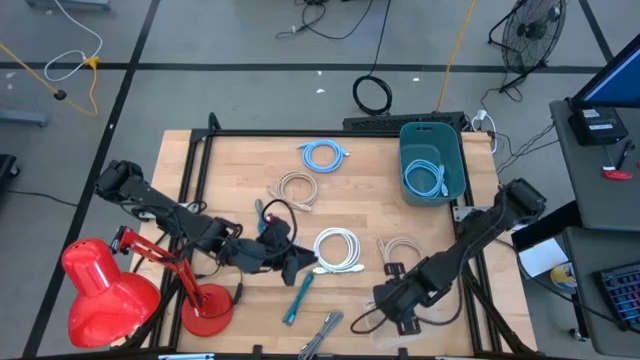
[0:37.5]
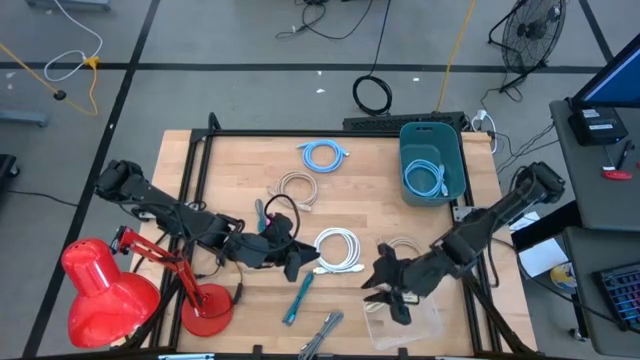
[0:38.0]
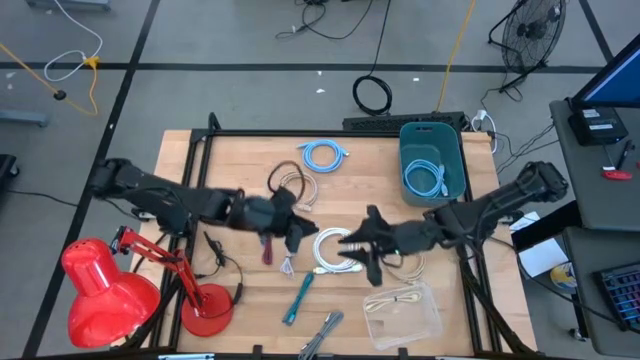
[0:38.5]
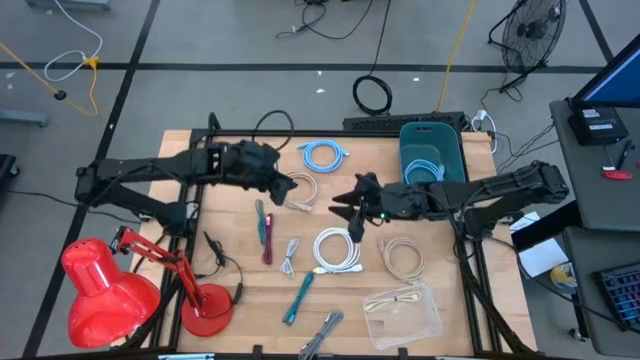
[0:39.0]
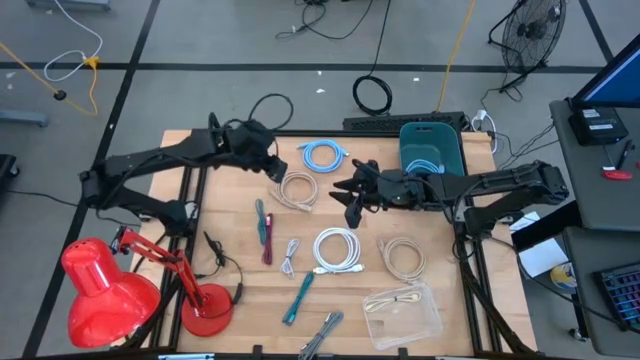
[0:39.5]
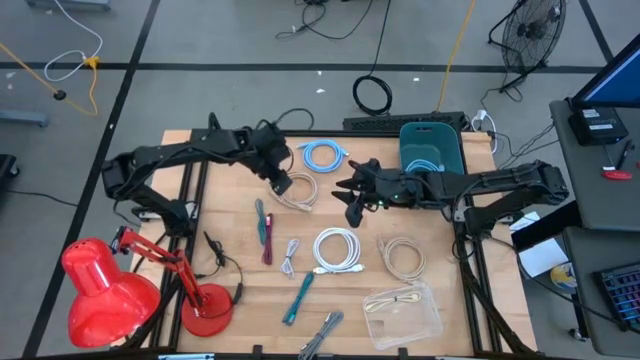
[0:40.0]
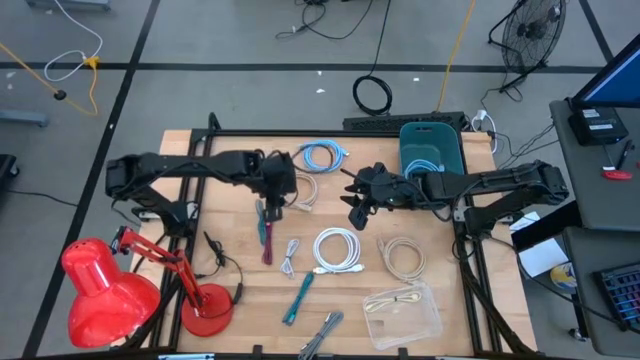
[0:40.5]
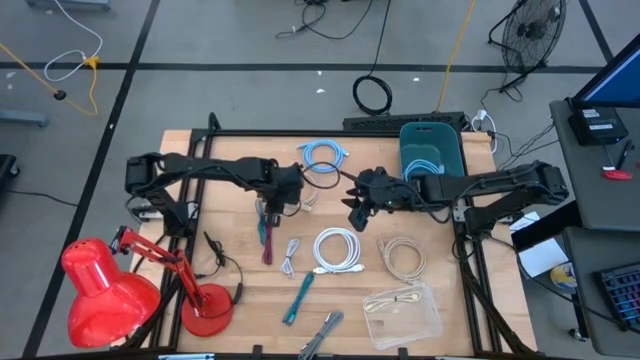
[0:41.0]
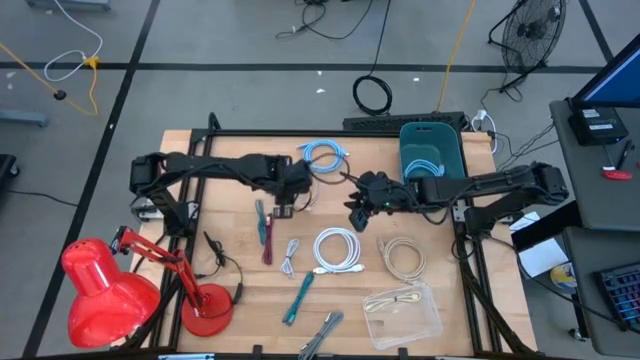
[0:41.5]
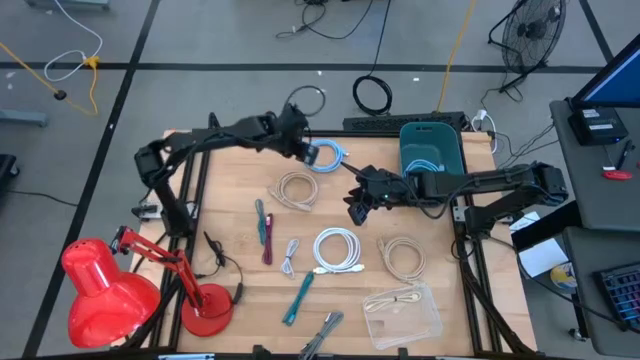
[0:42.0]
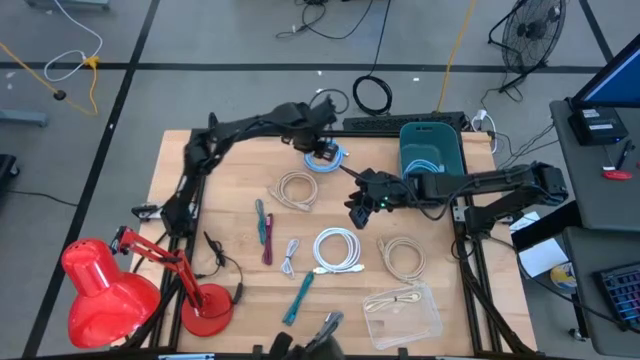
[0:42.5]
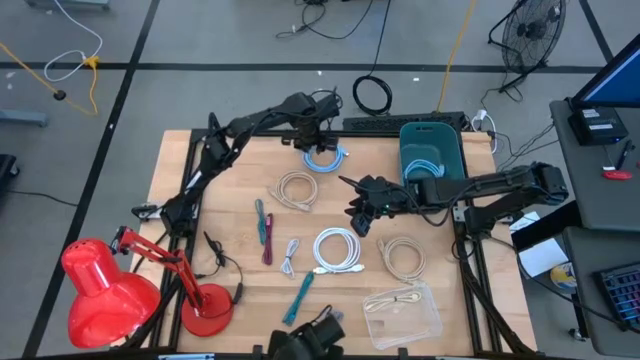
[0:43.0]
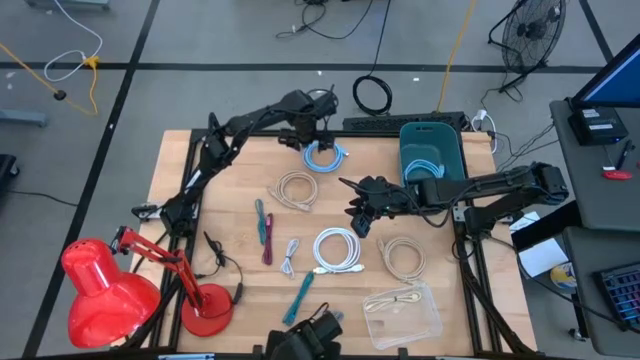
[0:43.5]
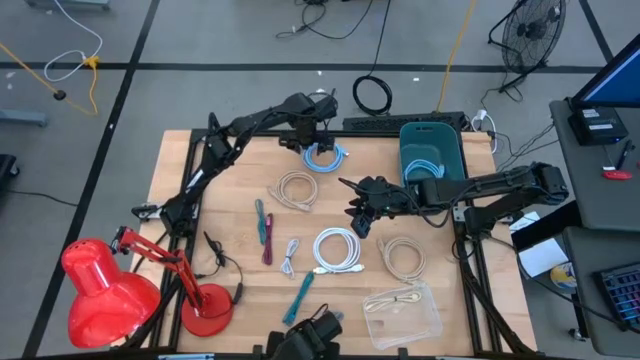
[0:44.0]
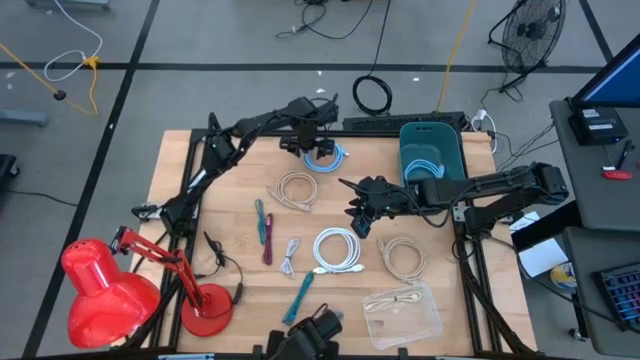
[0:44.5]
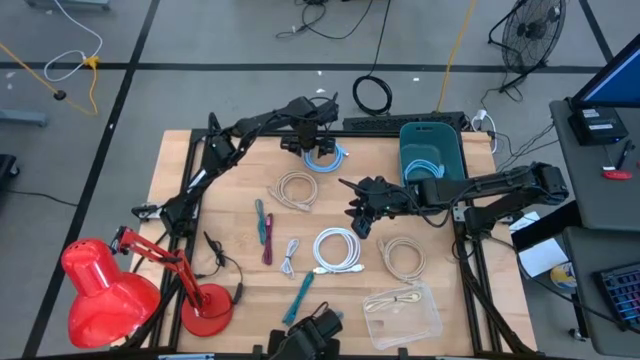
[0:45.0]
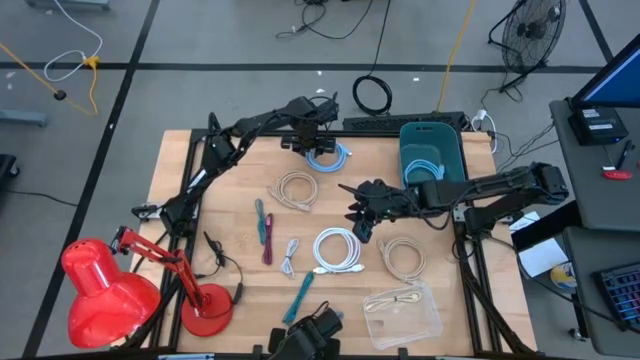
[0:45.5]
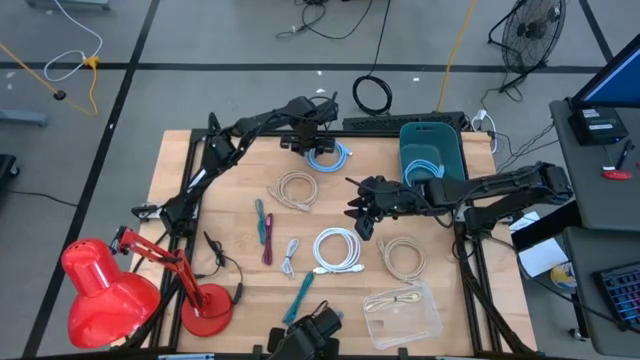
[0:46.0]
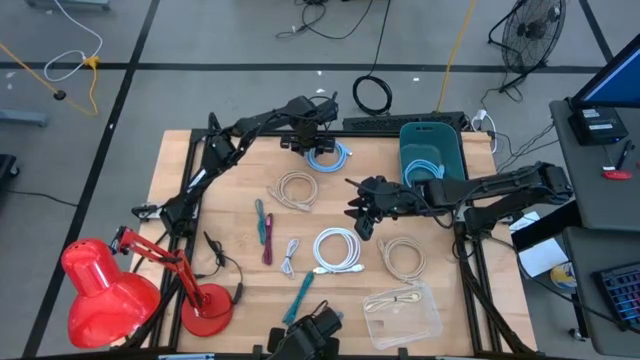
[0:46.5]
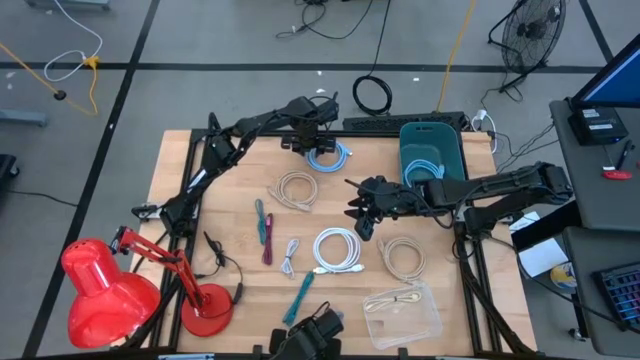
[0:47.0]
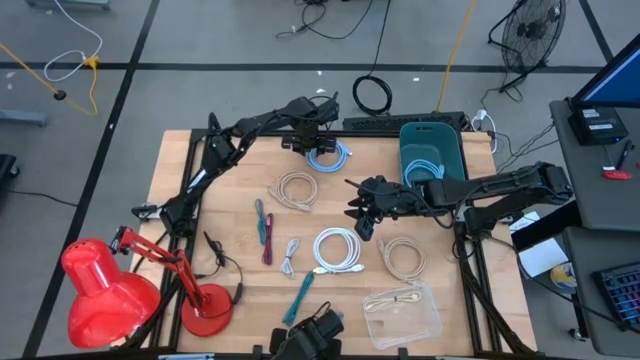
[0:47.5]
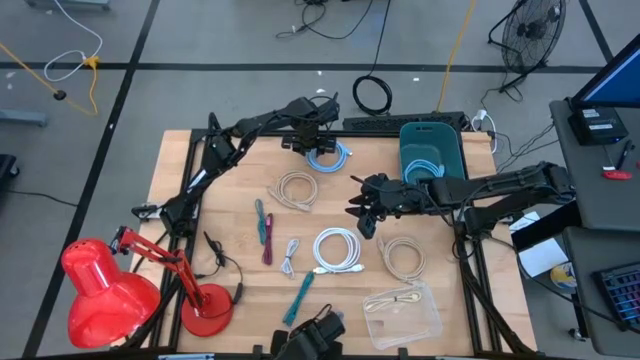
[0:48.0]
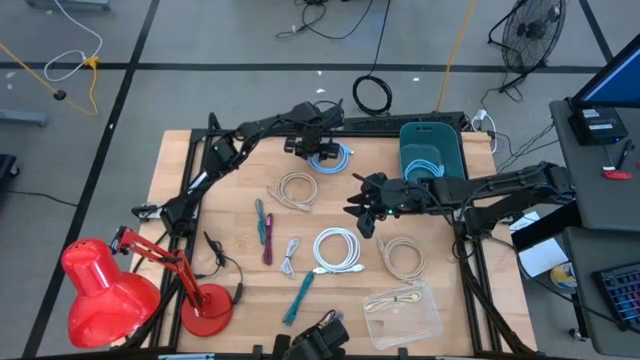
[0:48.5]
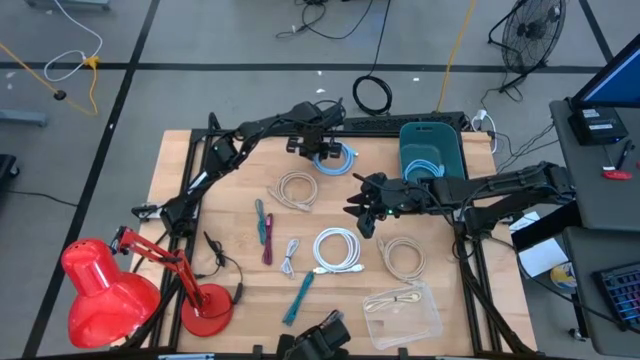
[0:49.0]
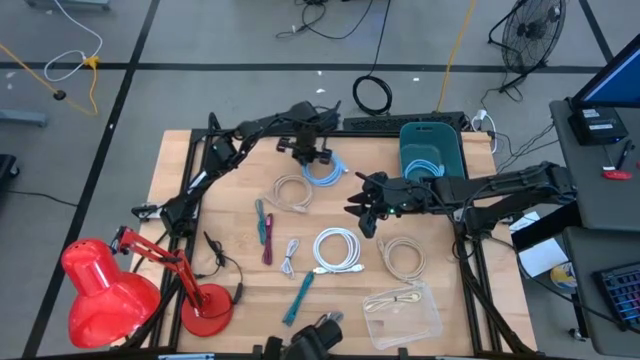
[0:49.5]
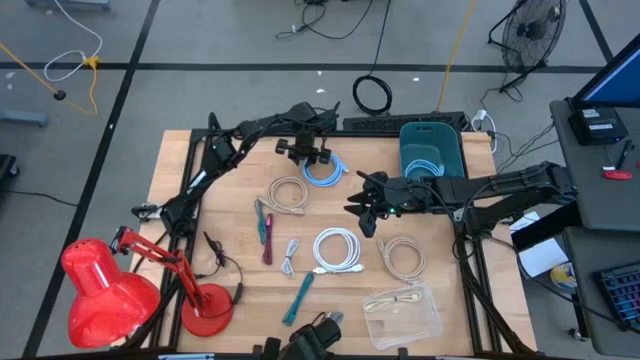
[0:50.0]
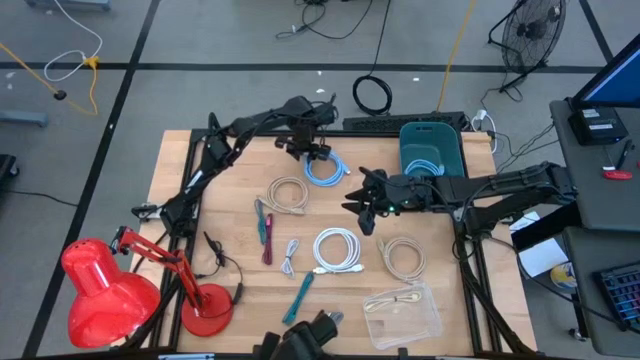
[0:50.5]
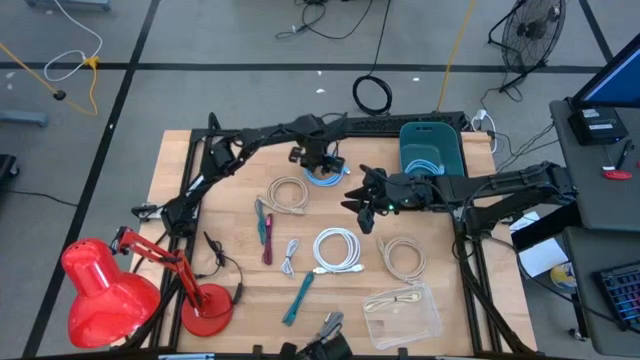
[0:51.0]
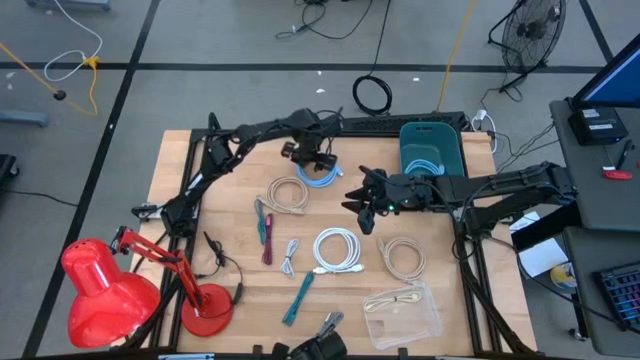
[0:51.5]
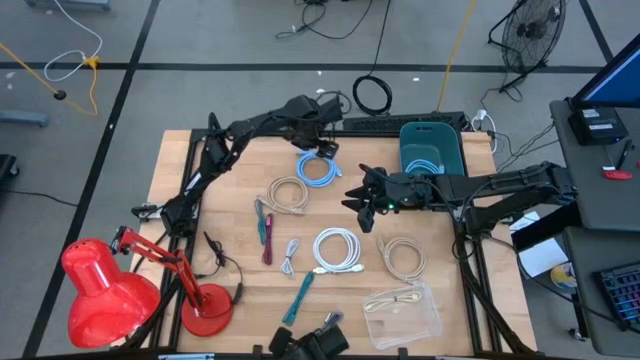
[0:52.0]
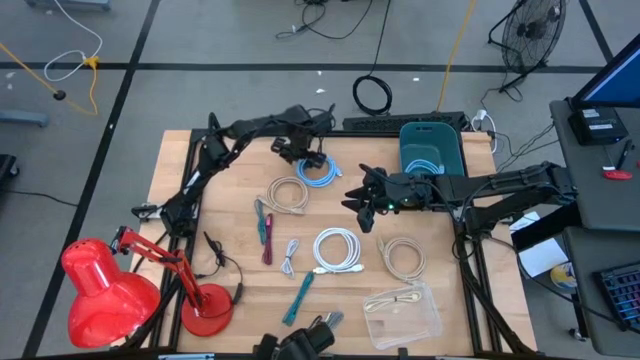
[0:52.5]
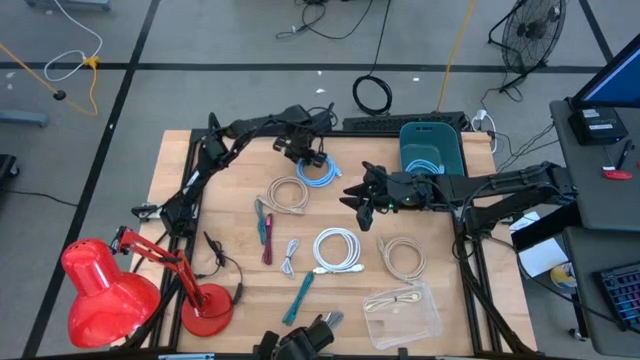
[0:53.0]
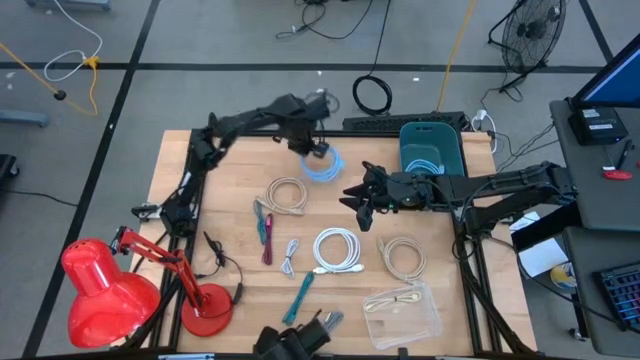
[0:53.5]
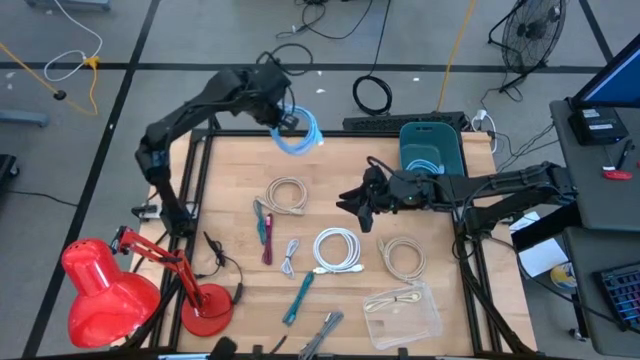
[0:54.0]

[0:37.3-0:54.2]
Task: Pick & Place USB Port
Put the blue hdmi cable into the blue bin

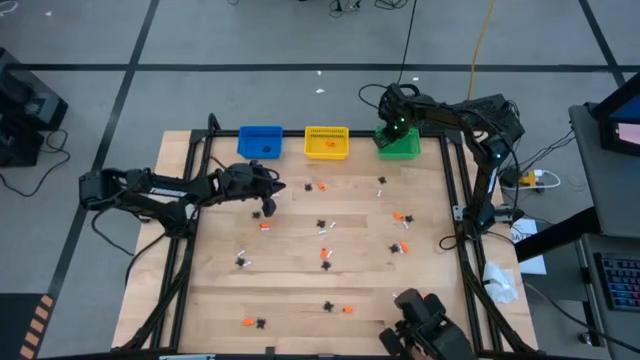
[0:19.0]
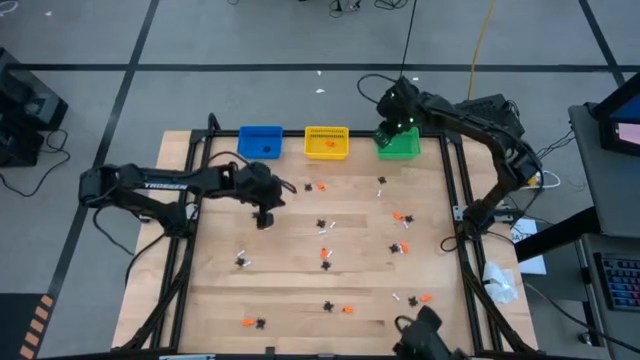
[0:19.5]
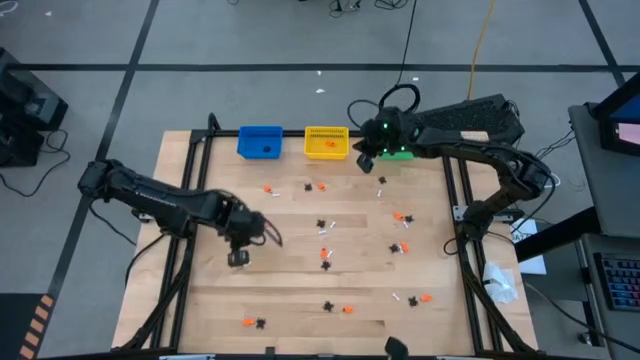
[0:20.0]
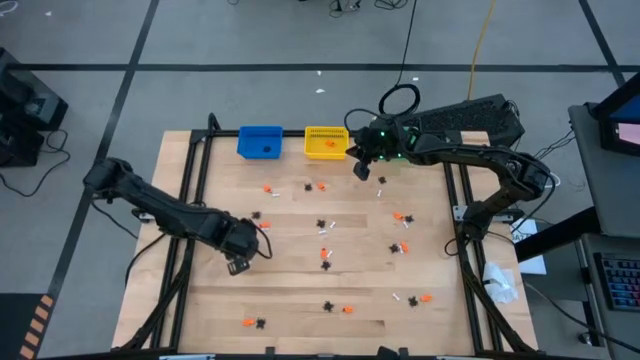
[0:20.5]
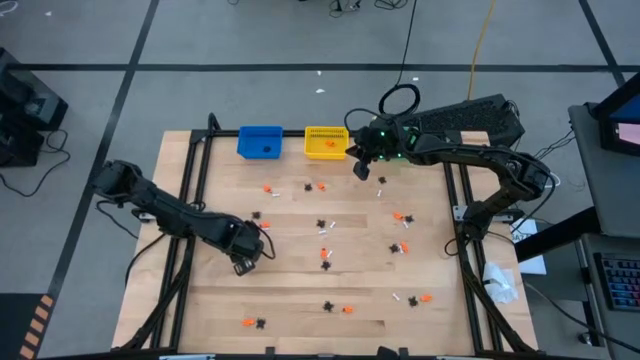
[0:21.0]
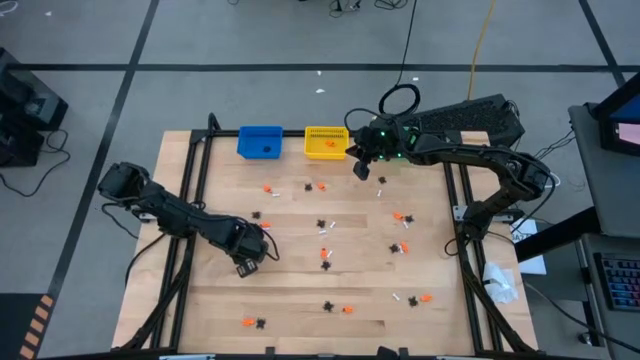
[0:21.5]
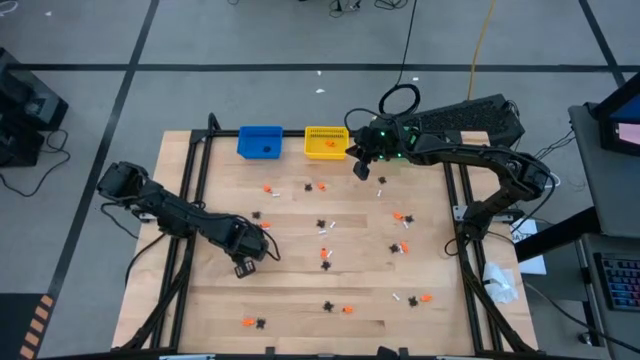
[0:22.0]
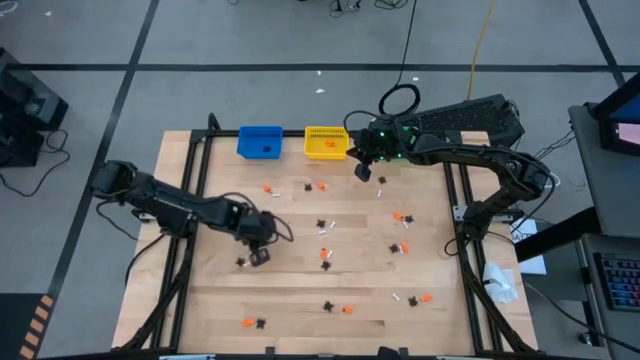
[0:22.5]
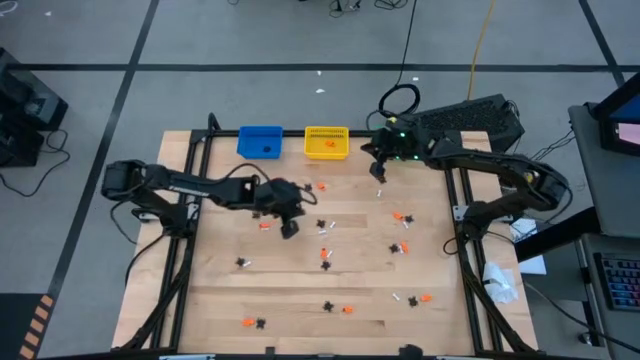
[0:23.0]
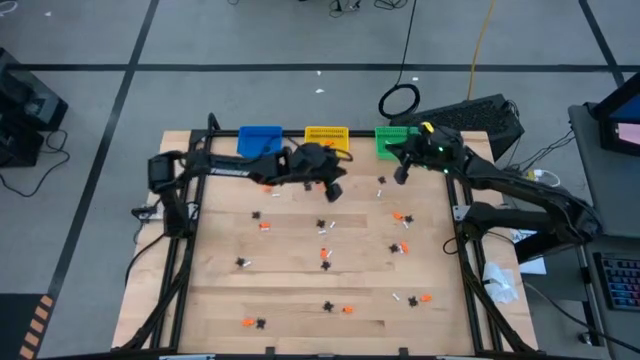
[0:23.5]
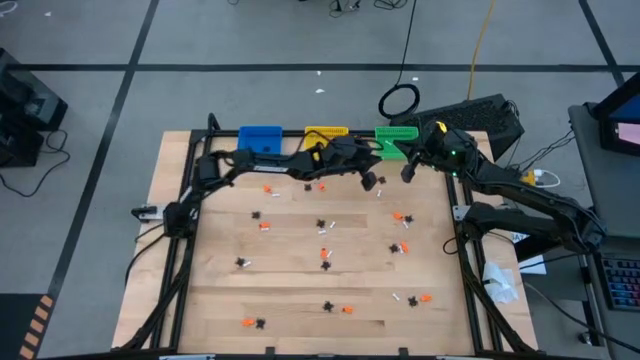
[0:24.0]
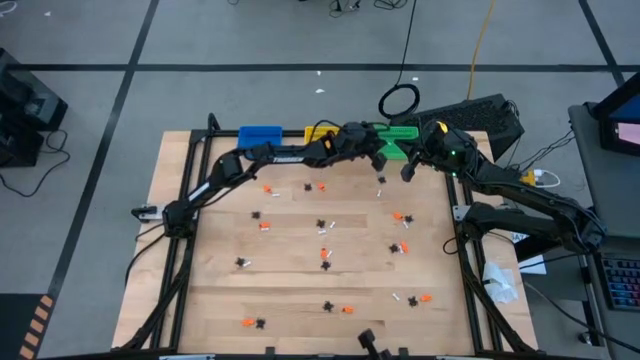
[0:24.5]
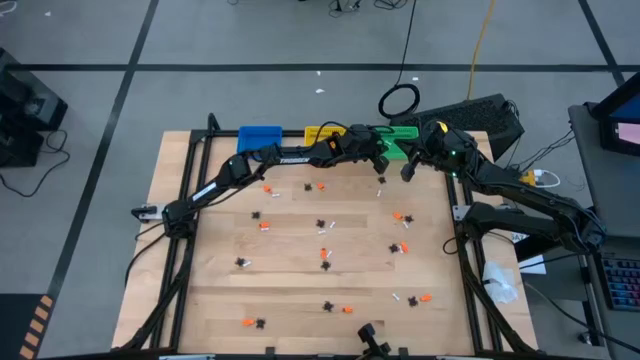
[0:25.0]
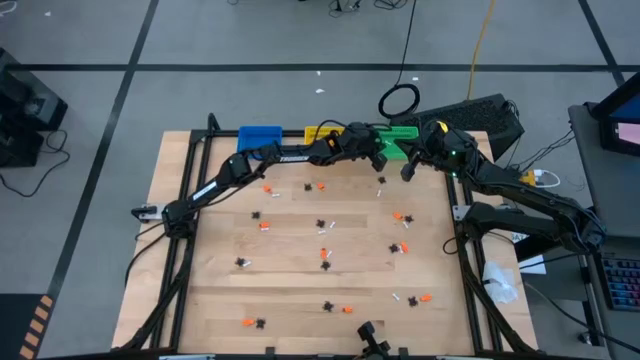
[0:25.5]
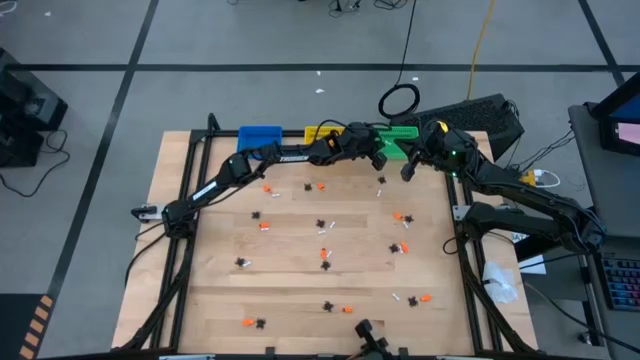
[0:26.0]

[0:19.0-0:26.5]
Task: Sort Halloween decoration
Put the white bone toy into the green bin
